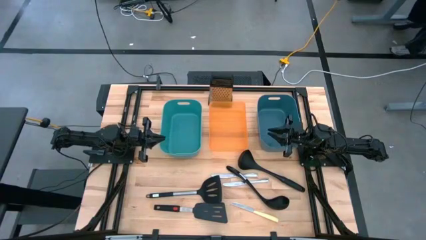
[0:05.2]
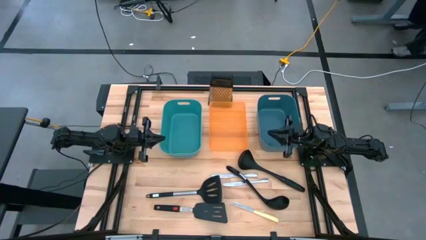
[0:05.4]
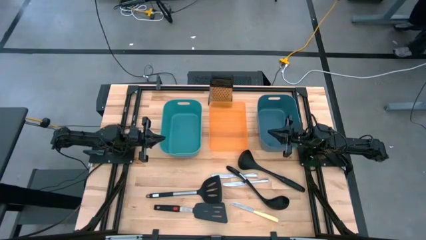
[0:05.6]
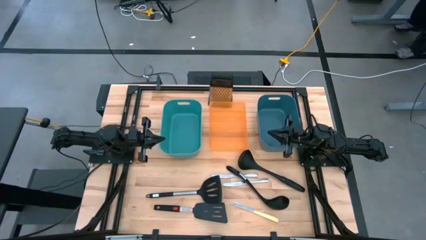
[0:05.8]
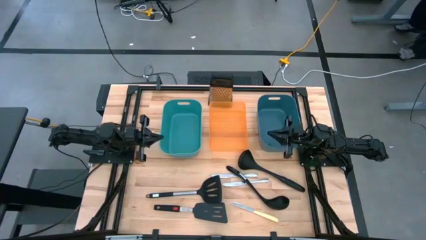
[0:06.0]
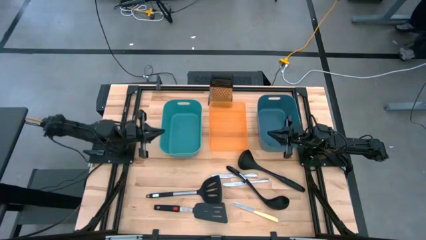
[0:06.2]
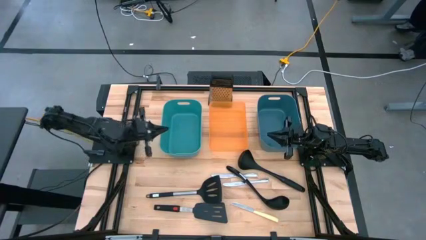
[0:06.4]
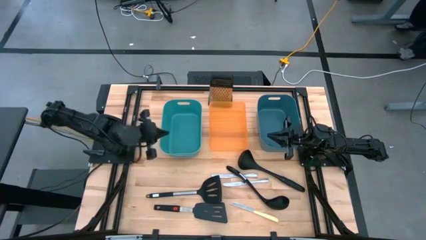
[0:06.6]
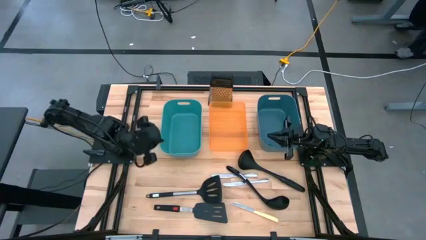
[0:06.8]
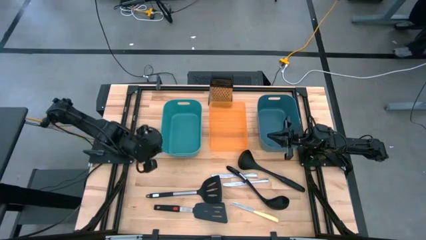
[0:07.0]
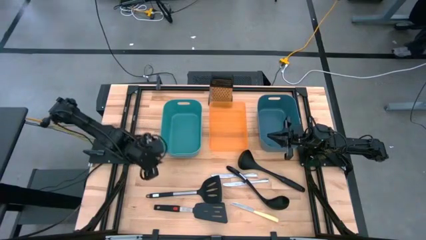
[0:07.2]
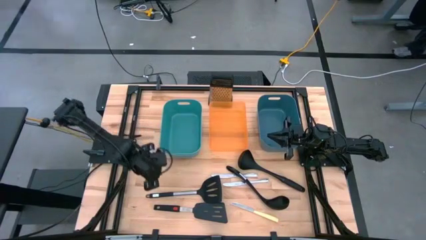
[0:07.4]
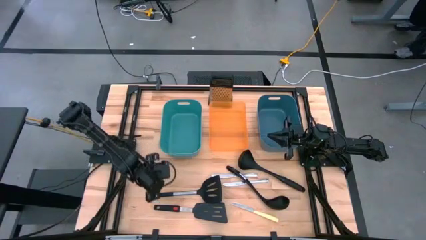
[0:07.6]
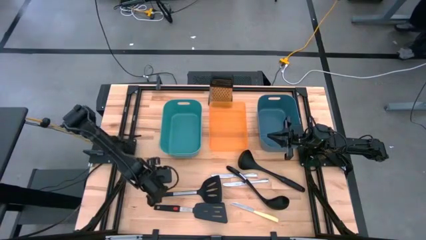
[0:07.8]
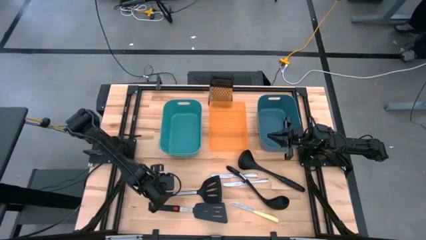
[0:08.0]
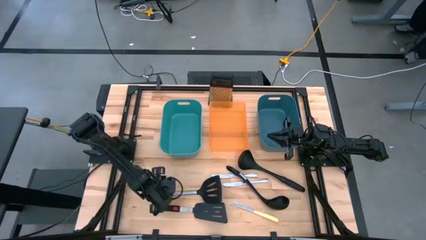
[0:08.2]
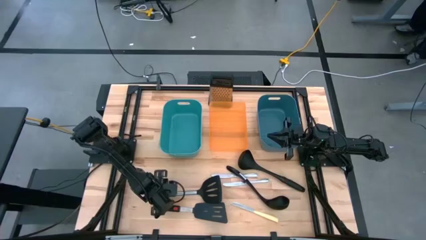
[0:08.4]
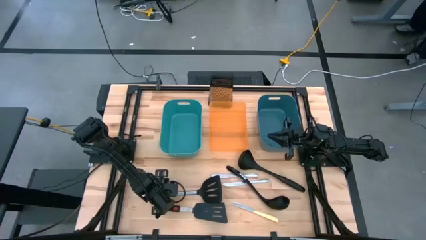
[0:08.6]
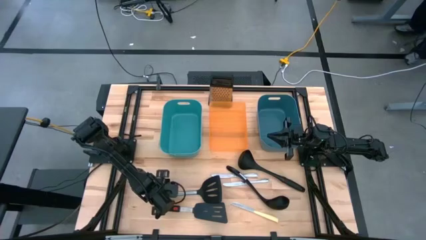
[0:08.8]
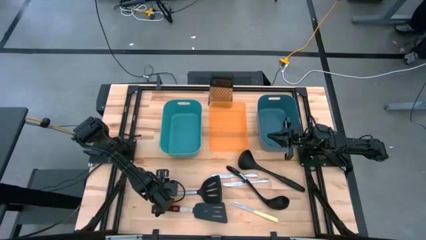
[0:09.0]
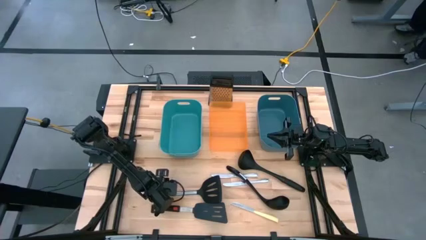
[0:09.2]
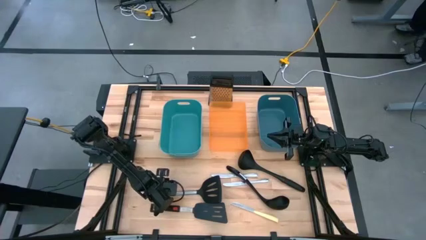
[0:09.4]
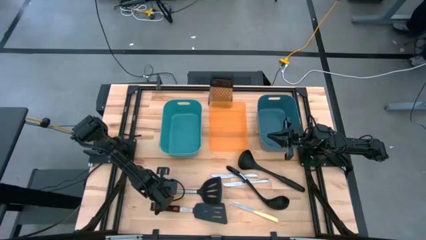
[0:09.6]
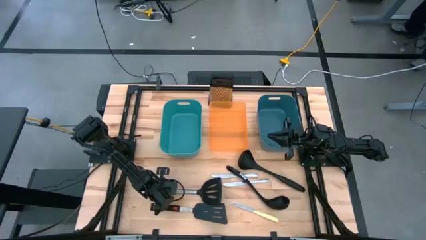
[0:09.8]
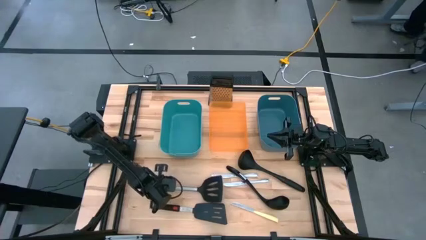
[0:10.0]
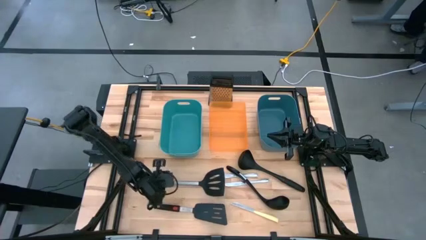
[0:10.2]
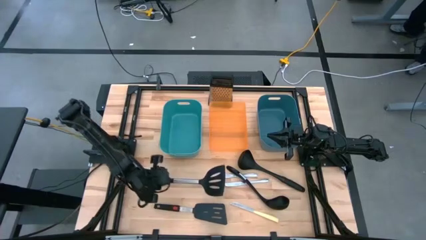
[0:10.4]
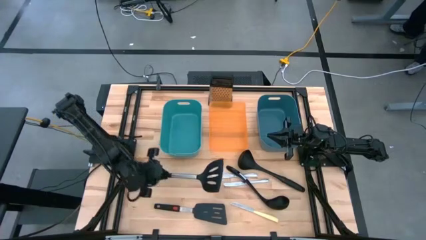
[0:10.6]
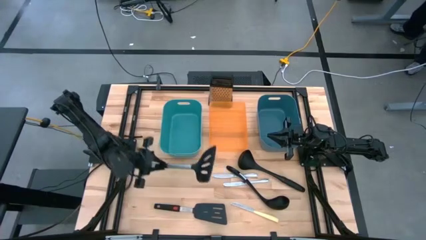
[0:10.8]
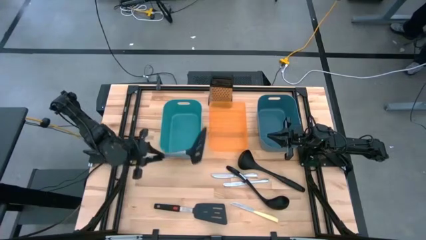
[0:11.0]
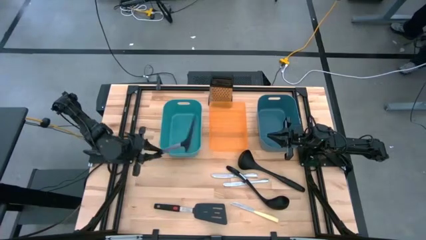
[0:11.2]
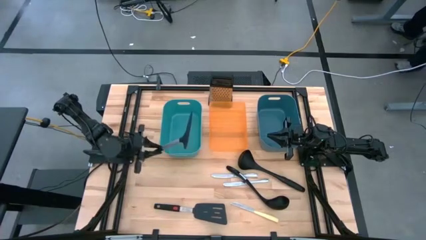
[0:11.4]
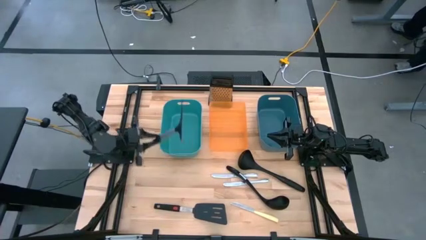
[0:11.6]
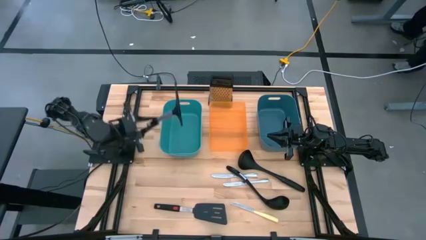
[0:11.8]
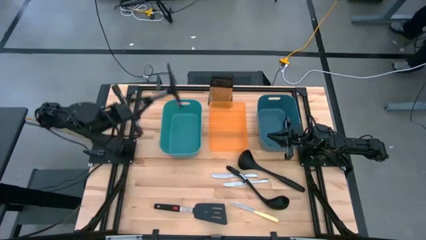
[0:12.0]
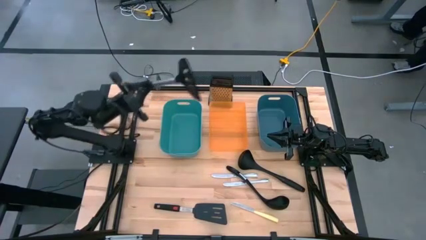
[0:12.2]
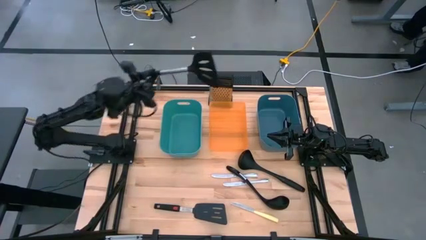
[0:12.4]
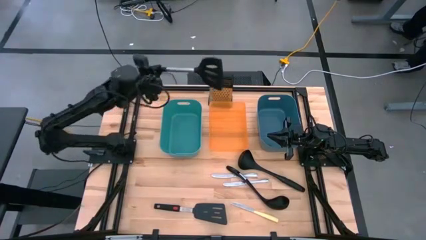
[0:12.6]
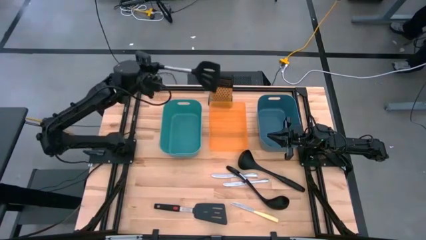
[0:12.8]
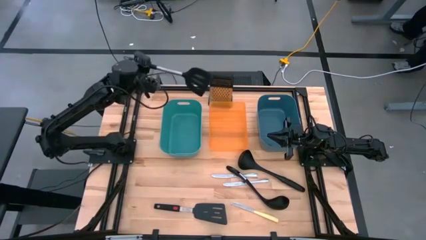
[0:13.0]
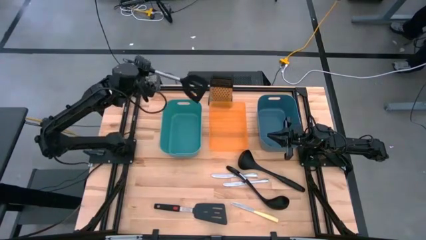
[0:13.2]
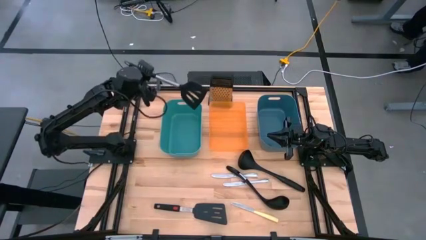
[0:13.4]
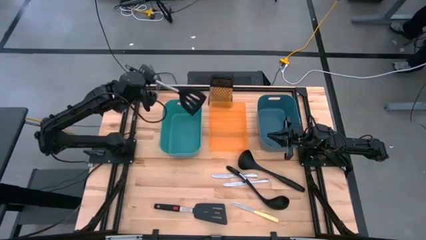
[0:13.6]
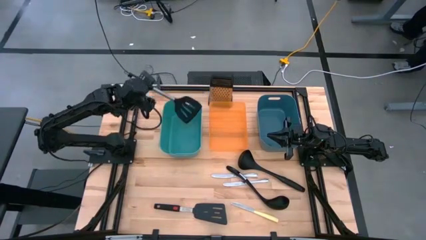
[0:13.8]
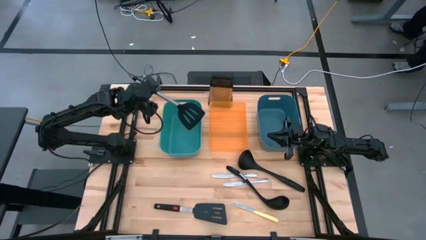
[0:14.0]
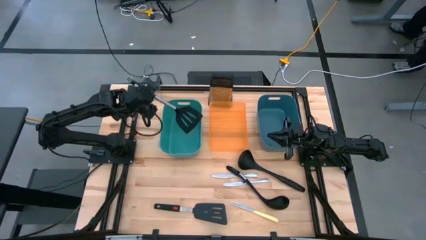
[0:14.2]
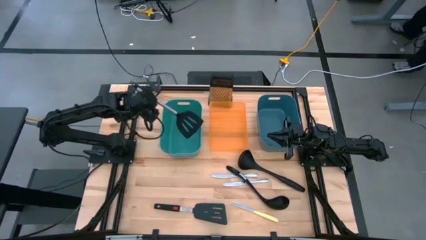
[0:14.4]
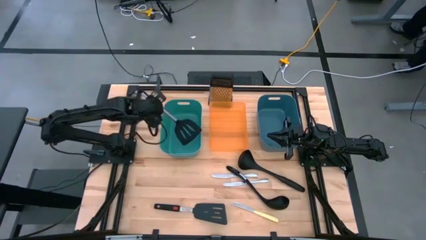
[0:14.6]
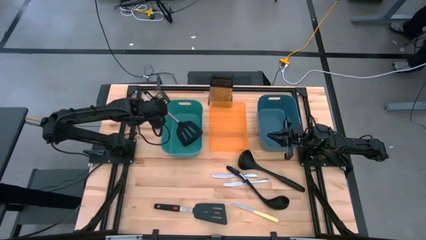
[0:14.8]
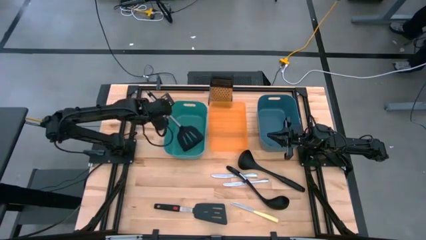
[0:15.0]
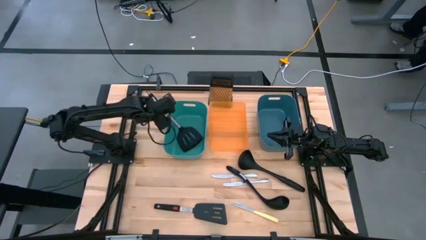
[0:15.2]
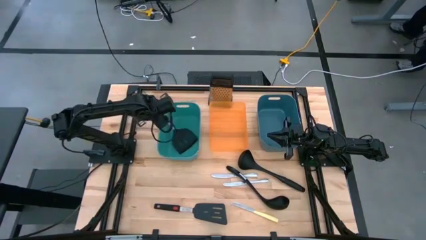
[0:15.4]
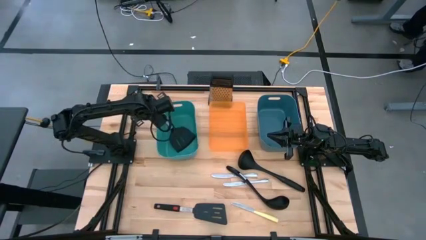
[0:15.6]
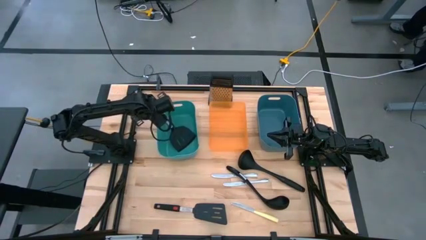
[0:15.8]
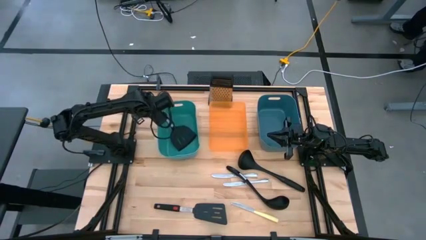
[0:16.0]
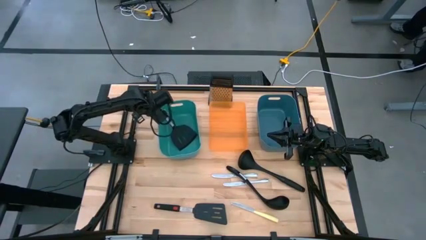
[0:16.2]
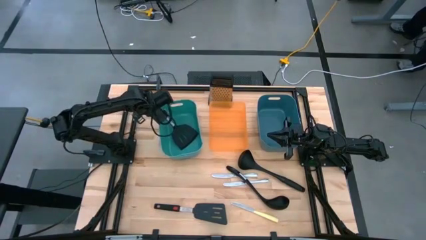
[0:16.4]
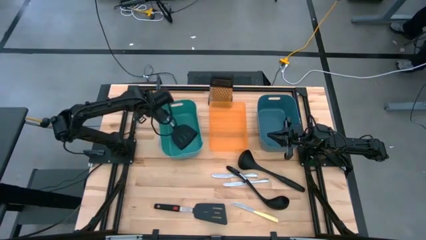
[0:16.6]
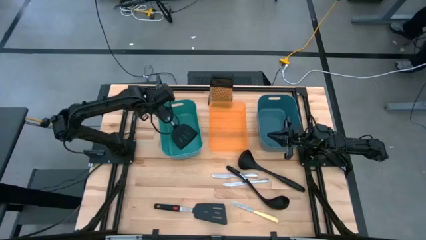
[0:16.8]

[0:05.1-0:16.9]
Task: Pick & Place Kitchen Items
Put the black wide spatula into the green bin

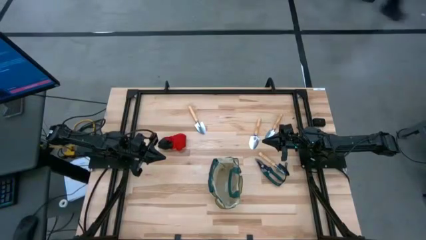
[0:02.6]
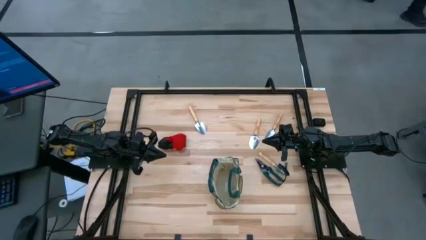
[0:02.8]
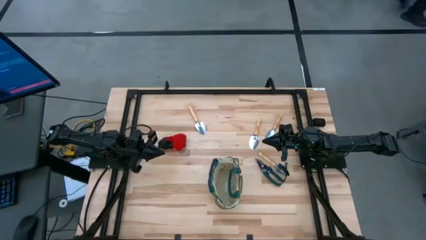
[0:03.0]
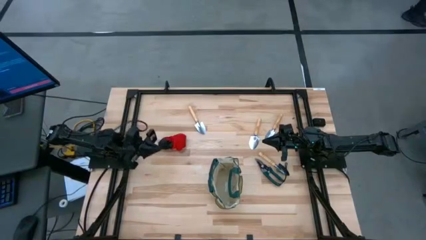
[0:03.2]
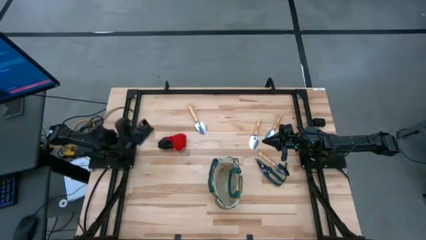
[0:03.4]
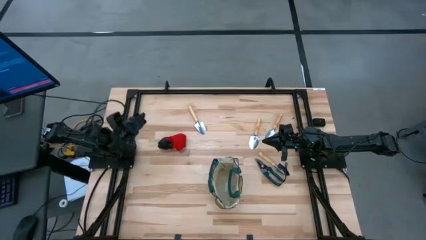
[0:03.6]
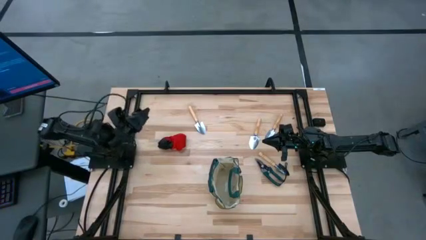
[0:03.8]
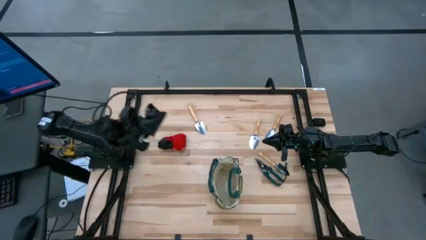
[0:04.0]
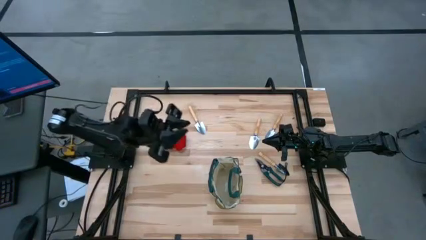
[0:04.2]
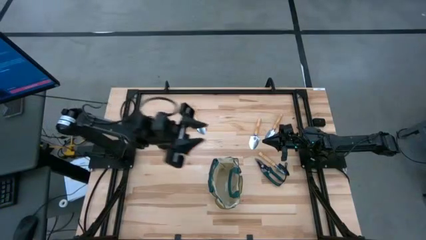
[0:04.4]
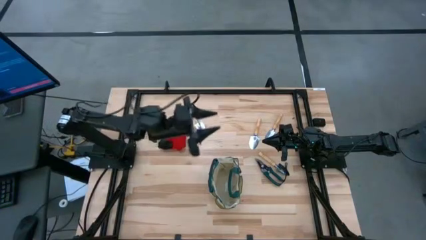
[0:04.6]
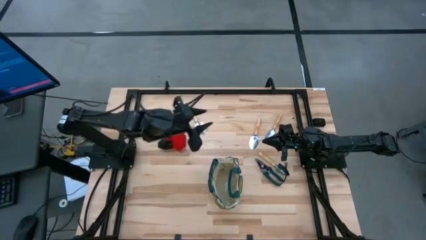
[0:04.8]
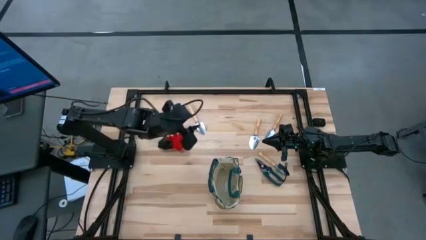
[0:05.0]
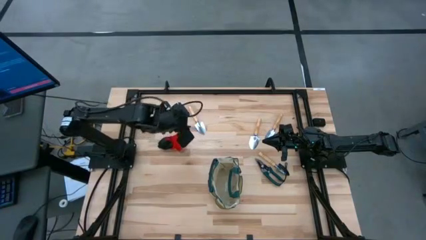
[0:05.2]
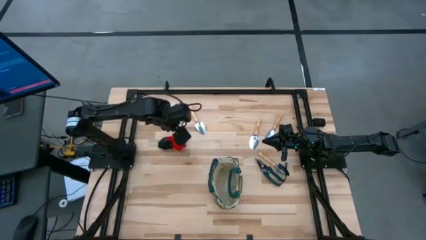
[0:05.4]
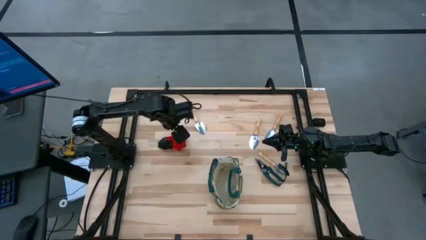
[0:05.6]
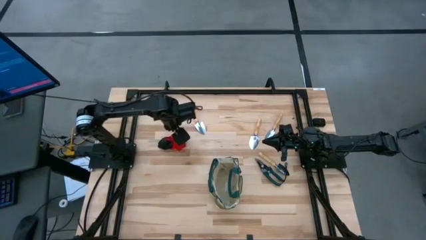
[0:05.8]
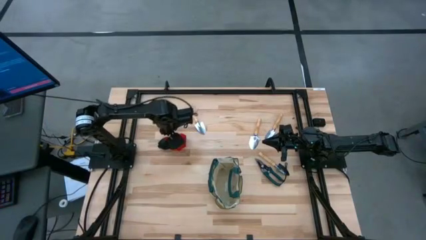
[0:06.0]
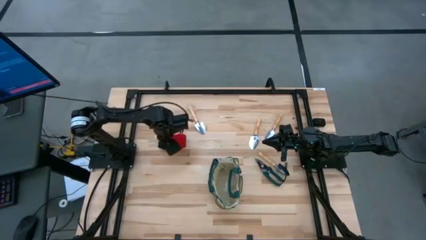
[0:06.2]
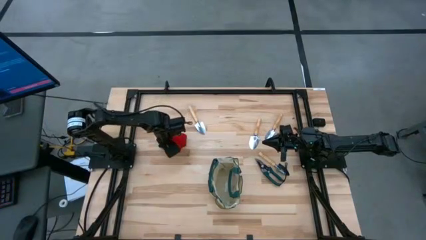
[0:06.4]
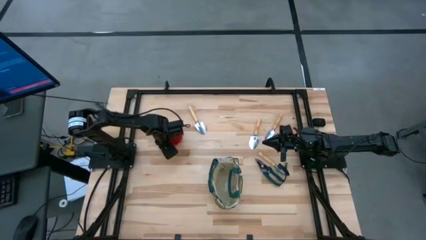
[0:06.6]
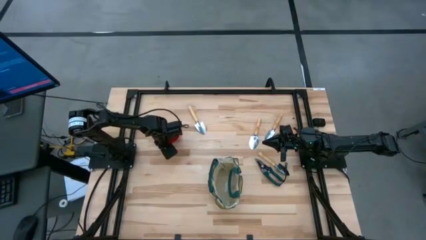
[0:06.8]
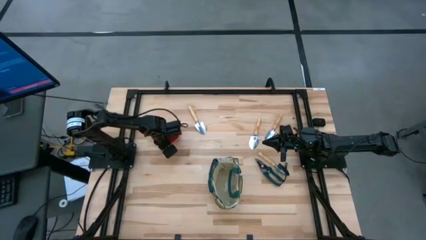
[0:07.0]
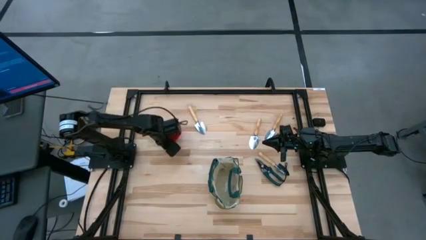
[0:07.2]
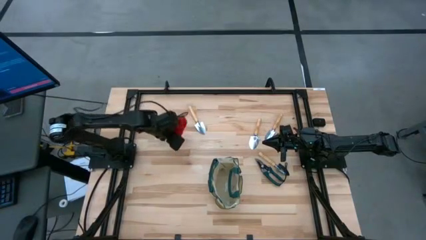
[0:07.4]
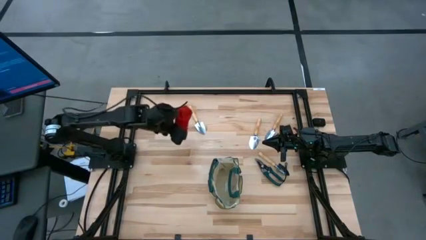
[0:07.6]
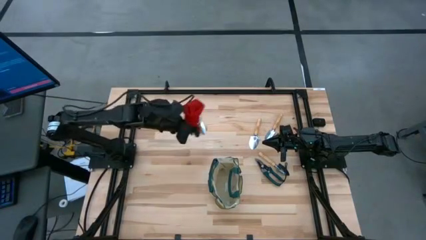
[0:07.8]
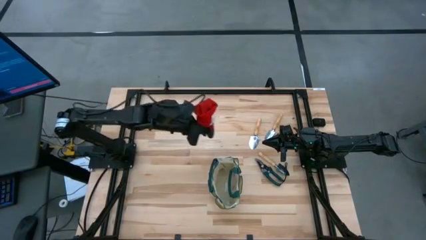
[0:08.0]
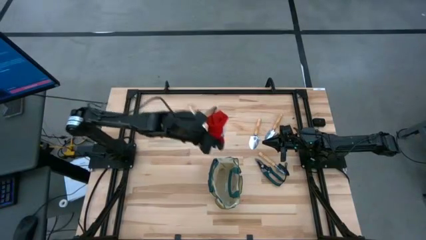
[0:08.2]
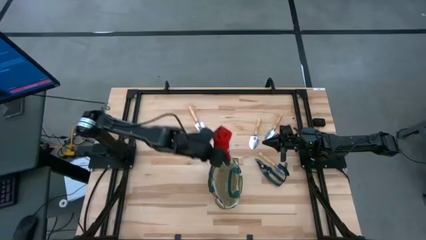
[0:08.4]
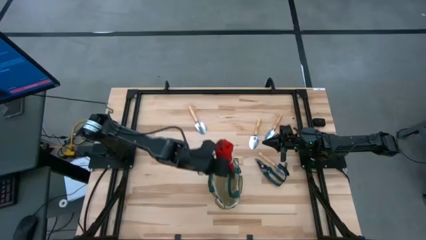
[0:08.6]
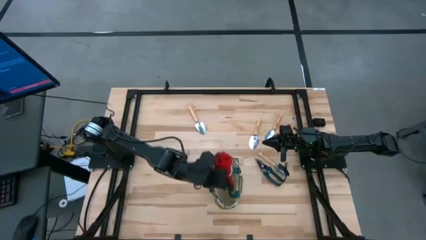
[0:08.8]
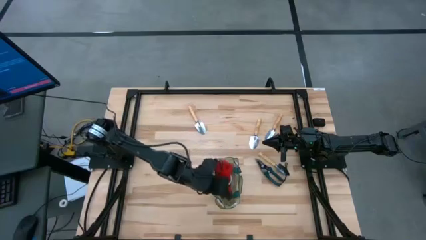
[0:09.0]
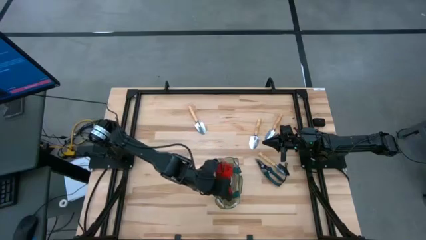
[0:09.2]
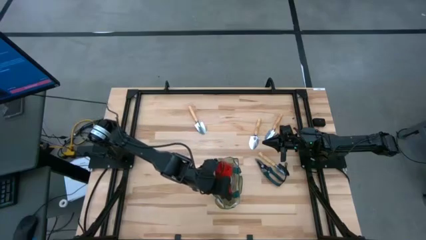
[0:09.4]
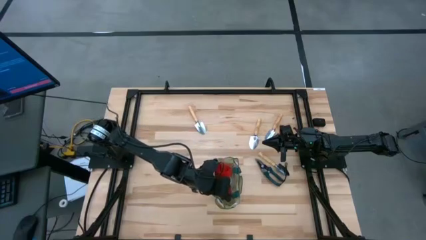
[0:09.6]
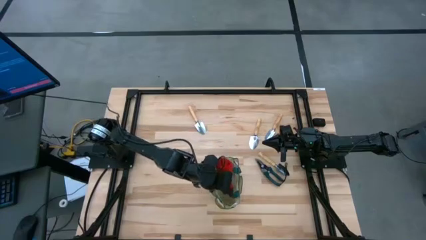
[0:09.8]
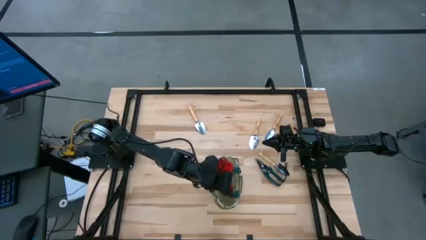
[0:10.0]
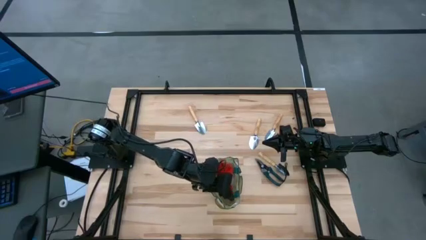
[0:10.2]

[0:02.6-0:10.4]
Task: Pick & Place Garden tools in Gardening bag
Put the red gloves into the green gardening bag
